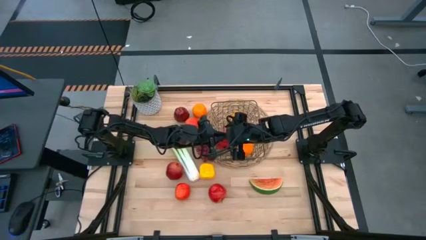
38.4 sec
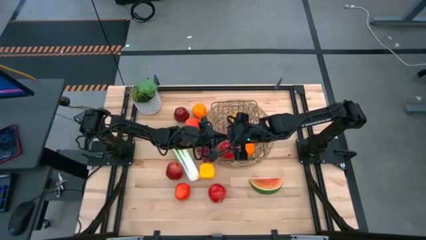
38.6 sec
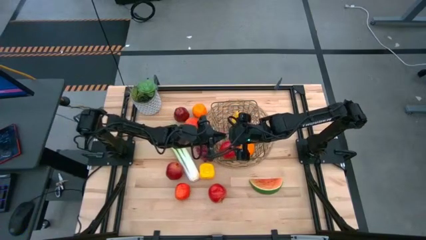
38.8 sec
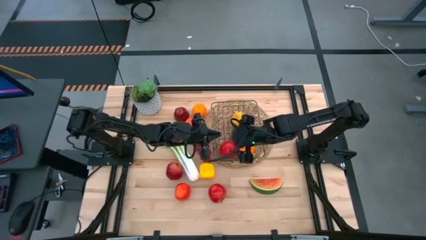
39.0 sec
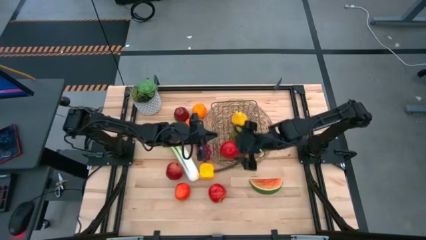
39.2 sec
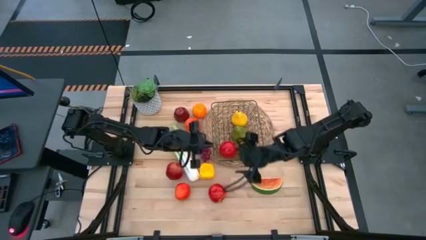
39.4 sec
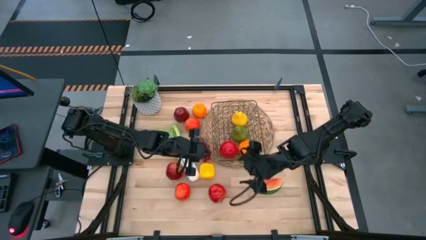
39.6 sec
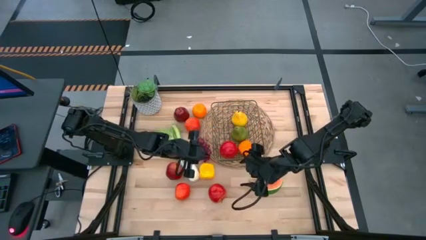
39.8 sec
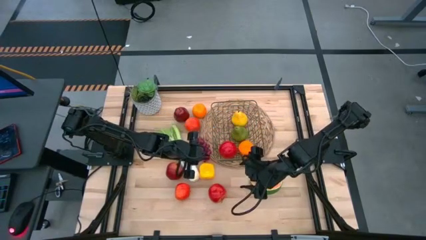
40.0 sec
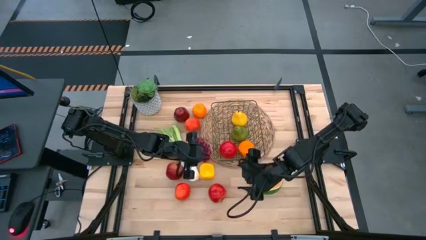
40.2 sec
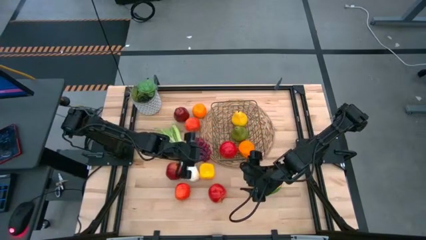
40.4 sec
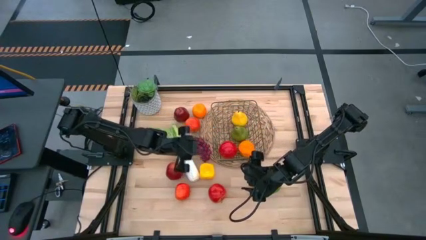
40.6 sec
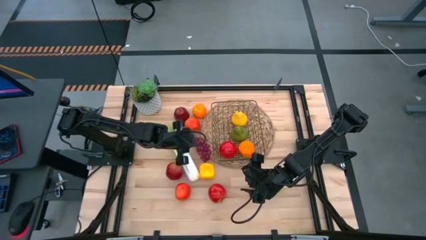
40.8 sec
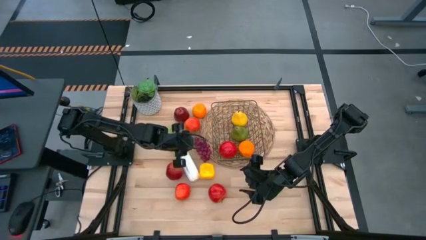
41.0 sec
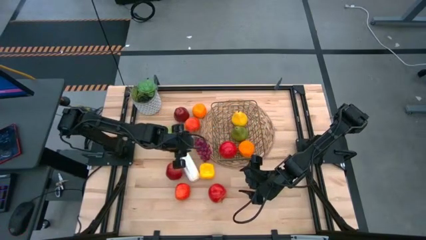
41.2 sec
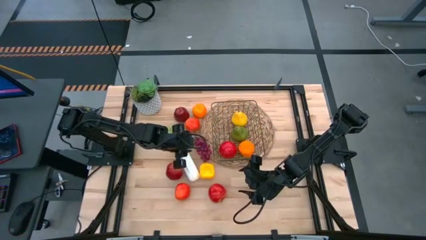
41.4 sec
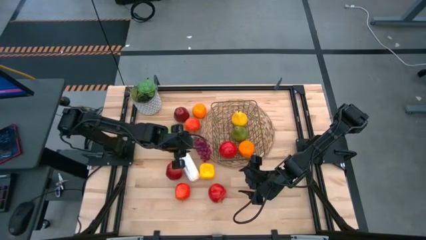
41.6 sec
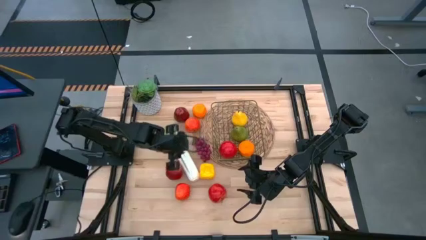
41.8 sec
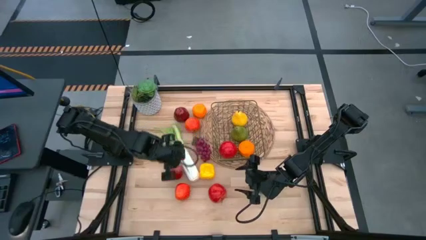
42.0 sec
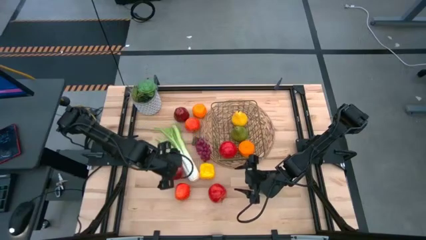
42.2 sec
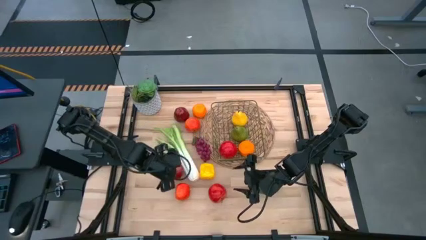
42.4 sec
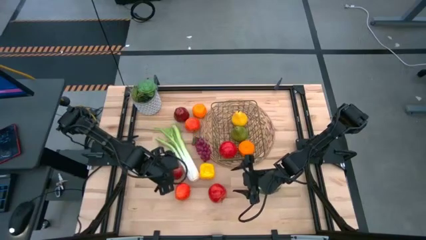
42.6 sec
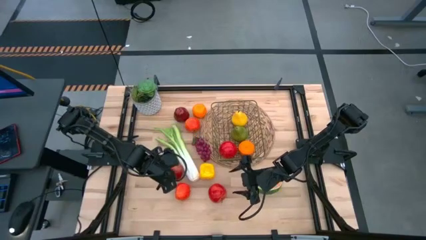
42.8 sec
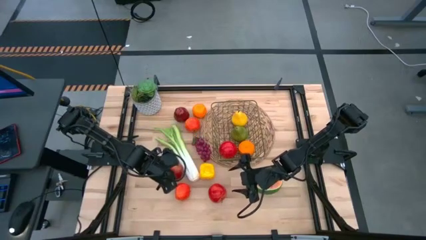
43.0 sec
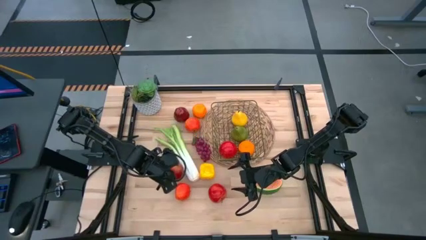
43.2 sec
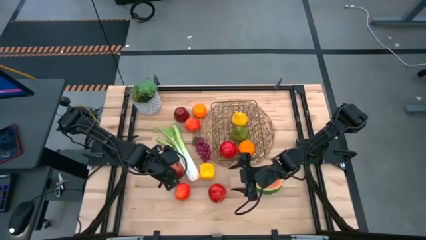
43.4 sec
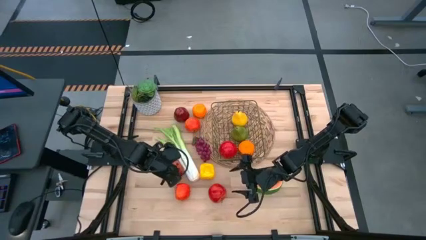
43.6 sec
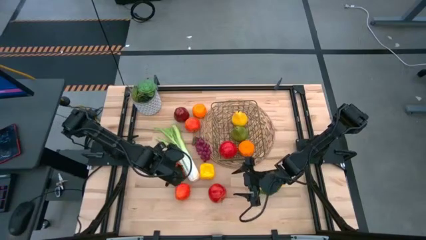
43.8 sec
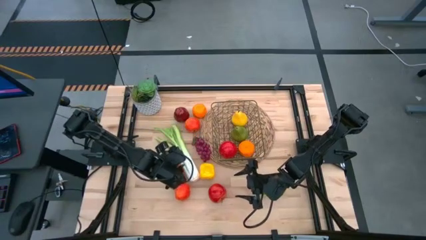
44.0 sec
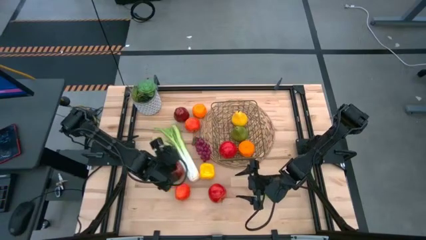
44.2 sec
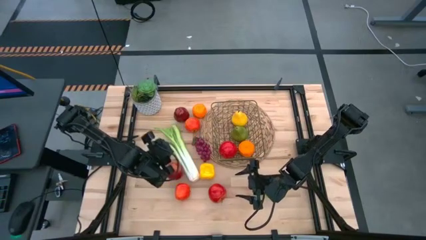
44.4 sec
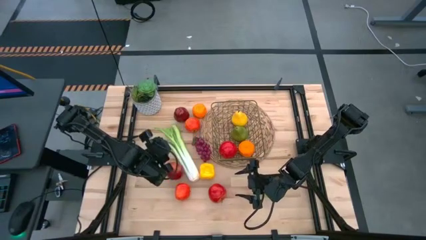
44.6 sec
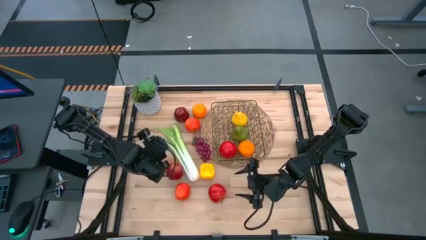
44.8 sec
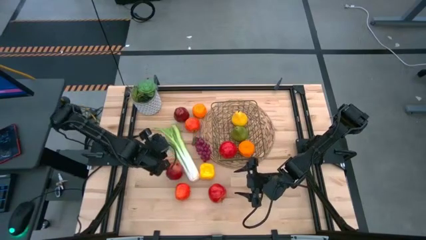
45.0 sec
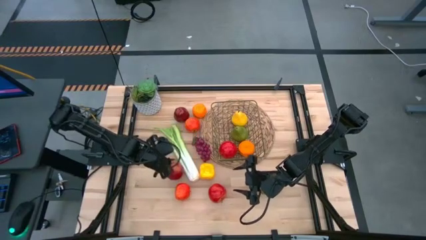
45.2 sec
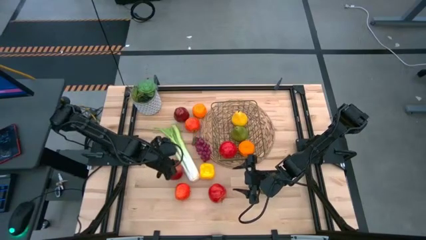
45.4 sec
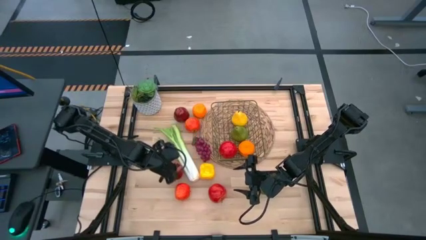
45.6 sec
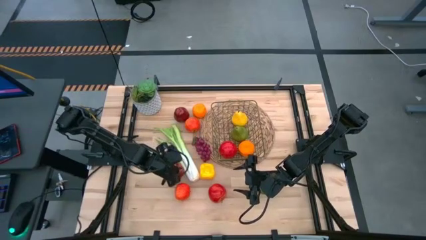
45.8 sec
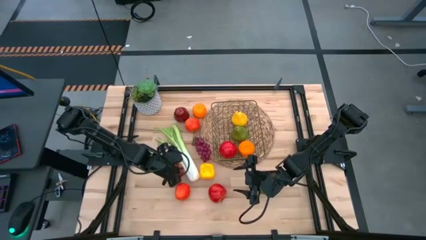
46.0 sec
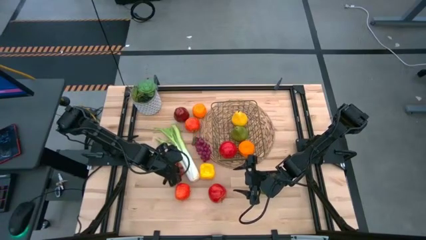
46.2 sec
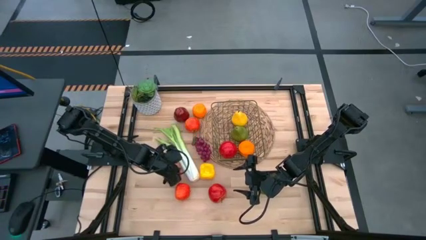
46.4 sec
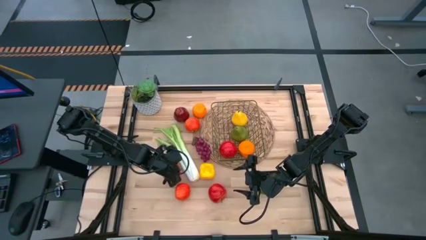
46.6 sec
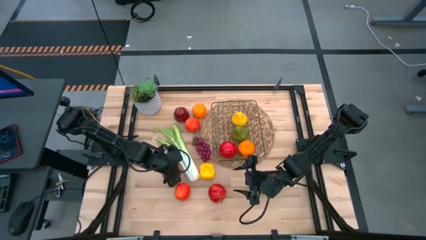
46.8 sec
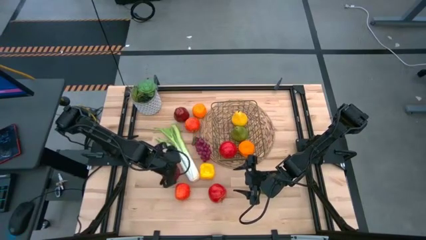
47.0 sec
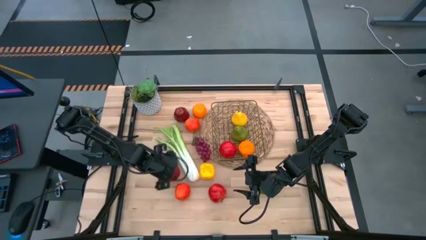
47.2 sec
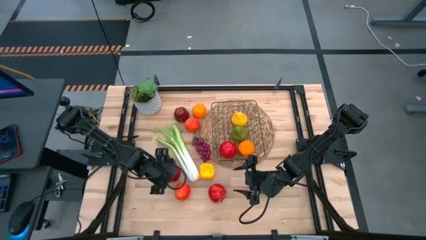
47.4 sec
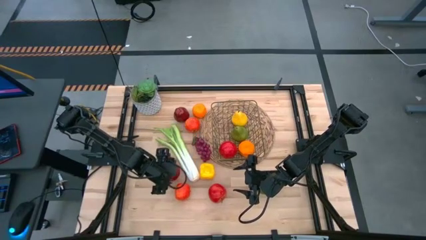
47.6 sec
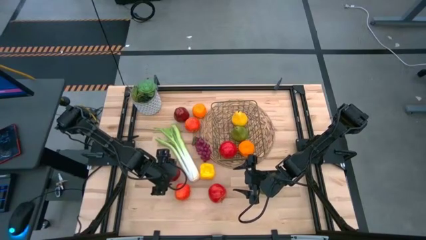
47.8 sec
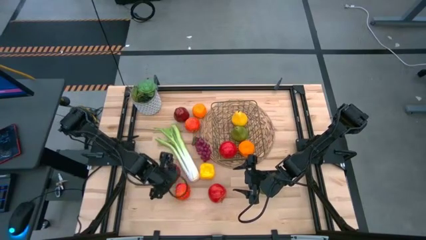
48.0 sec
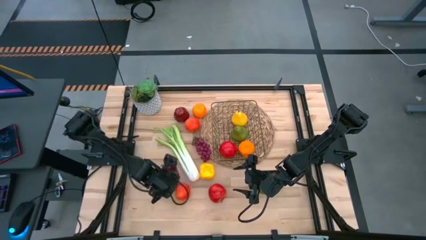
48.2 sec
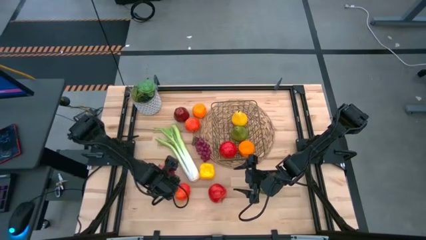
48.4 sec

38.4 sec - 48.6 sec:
Task: Build produce basket
Put the pomegranate into the wire basket

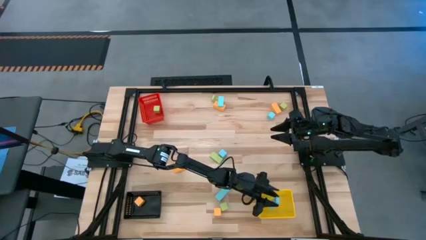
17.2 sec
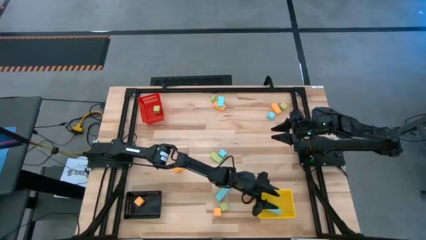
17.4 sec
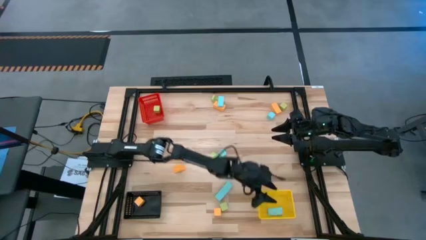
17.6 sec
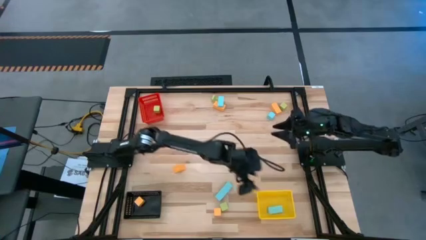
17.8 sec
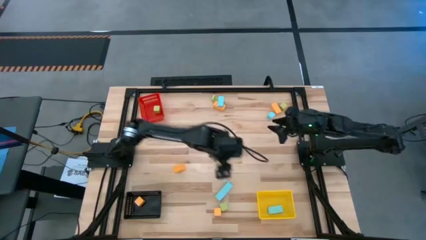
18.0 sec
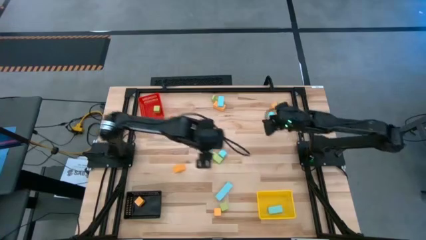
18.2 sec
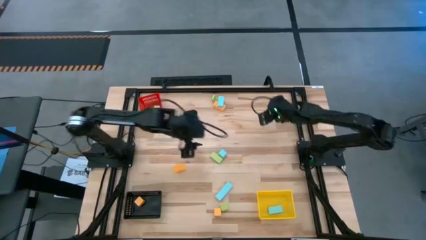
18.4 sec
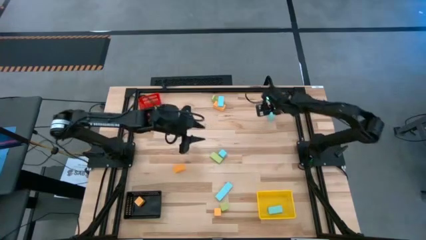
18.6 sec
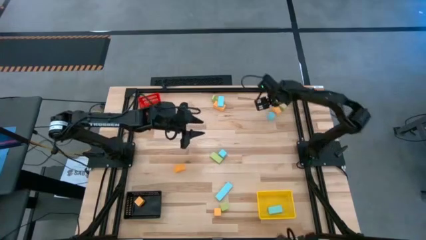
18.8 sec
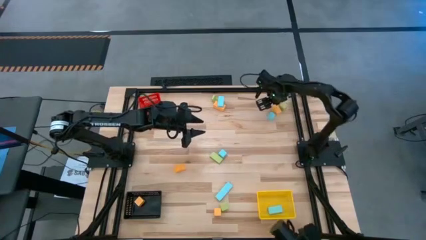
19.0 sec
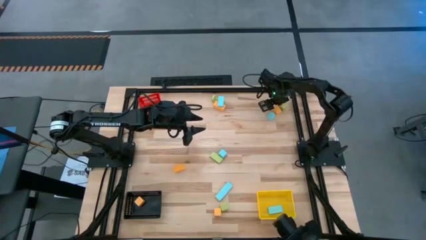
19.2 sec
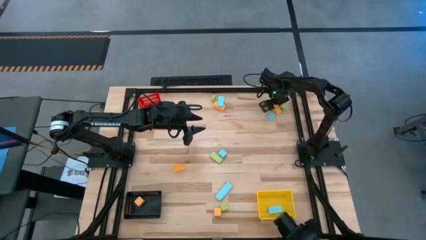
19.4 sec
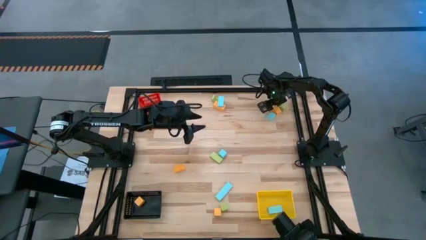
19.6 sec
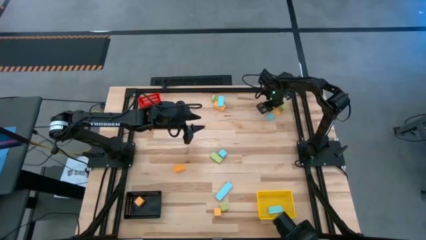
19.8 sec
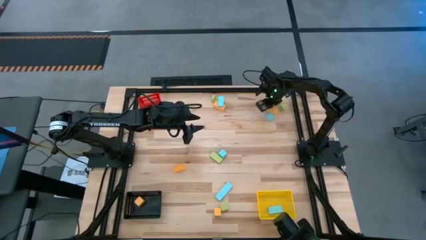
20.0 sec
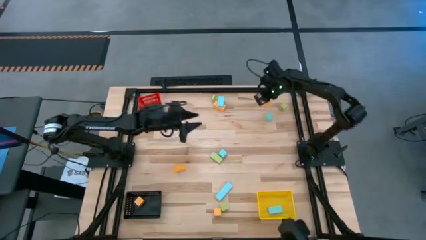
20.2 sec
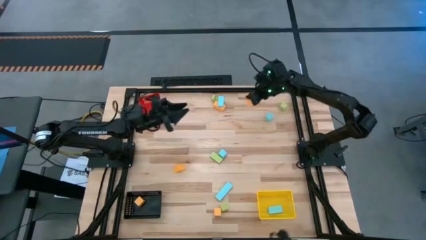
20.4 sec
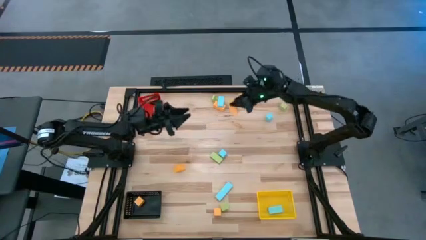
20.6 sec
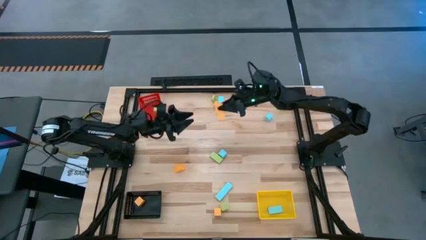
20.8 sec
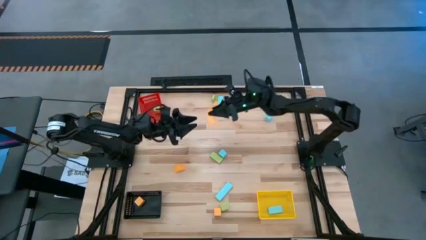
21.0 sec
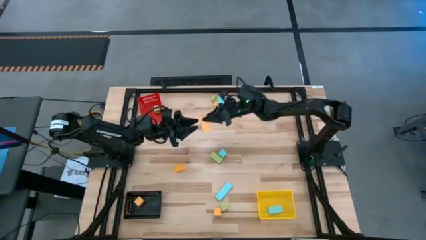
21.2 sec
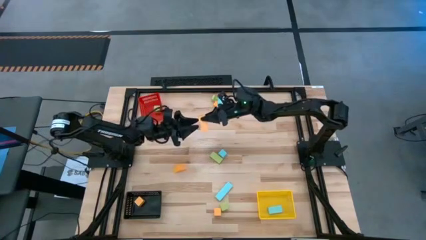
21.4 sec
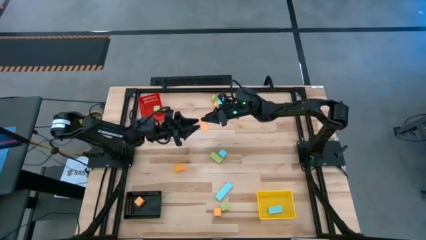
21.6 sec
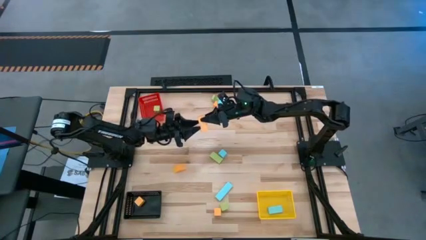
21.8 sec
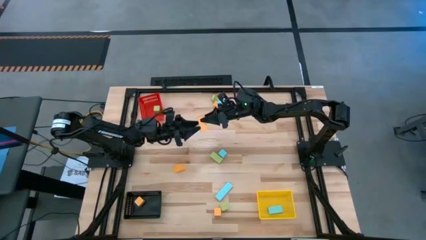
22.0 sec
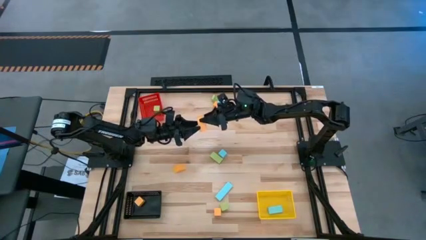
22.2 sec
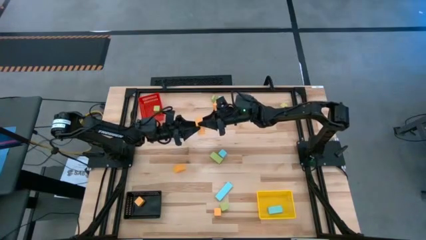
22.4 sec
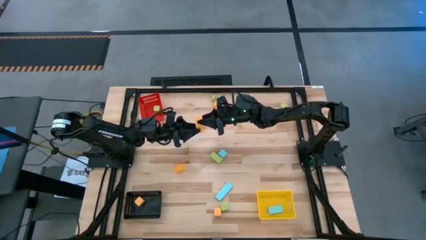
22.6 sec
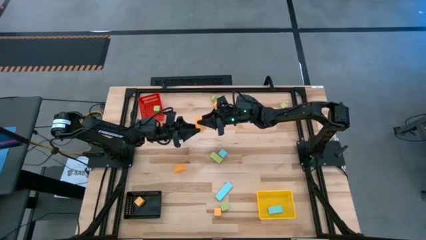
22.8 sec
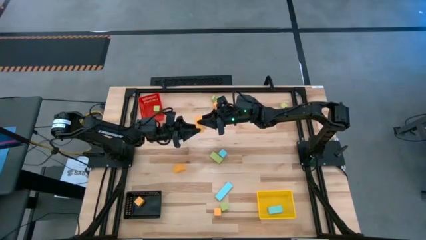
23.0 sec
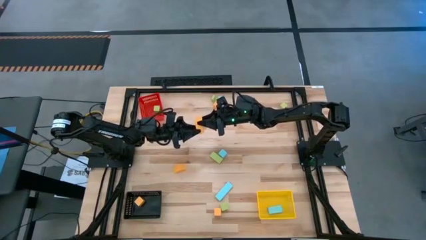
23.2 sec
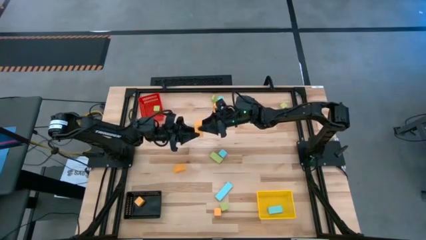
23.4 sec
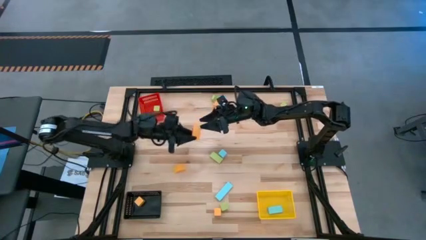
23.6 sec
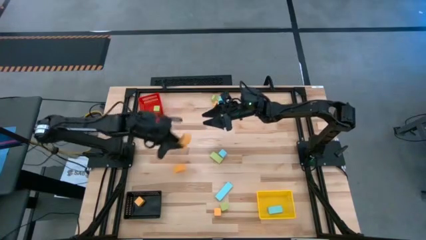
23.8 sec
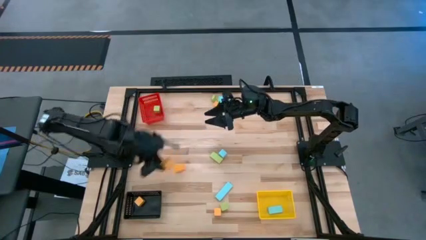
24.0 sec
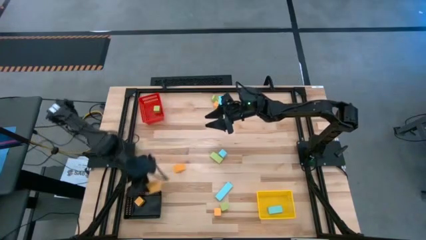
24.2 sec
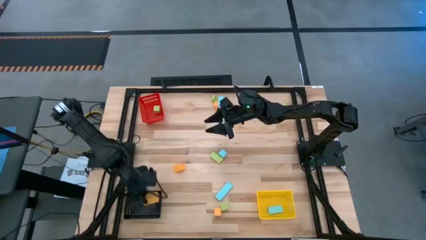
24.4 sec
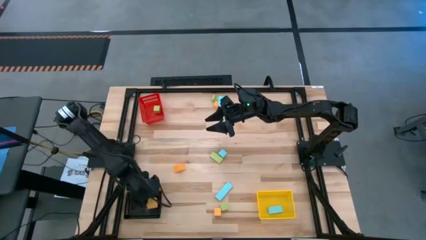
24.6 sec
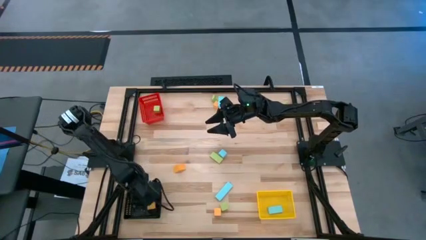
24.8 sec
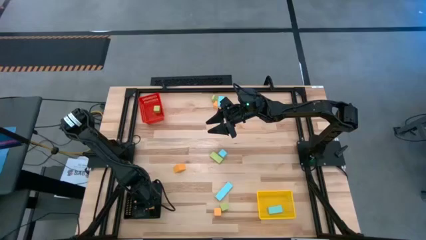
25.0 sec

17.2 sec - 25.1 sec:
Task: Sort & place blocks by color
Put the yellow block into the black bin
